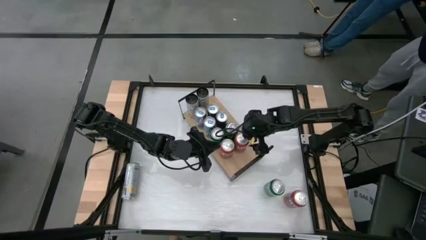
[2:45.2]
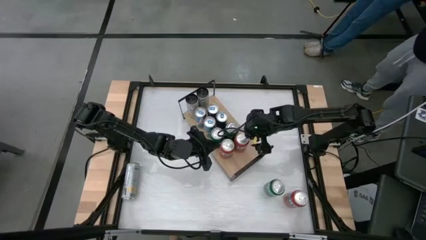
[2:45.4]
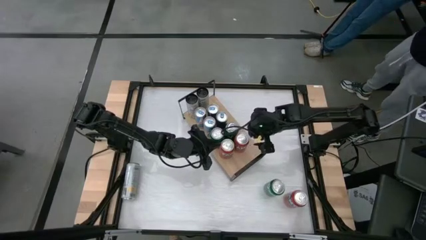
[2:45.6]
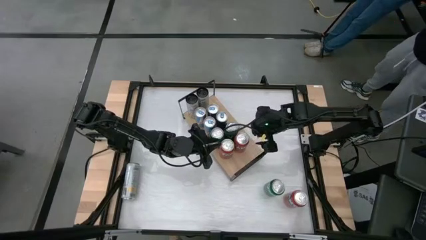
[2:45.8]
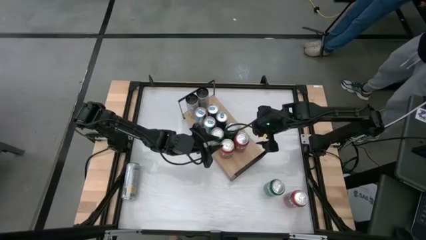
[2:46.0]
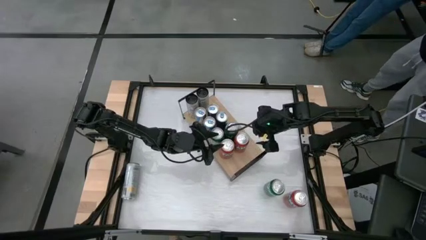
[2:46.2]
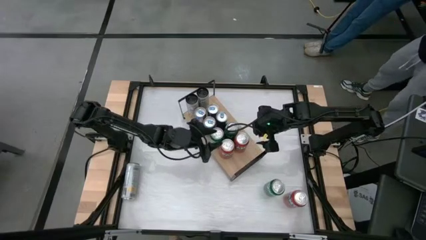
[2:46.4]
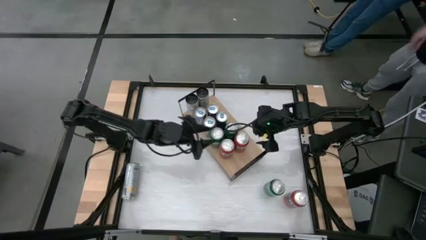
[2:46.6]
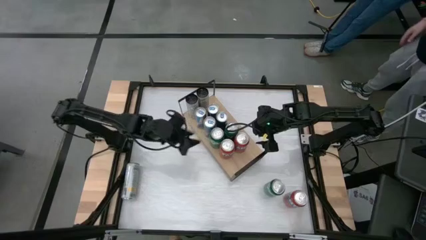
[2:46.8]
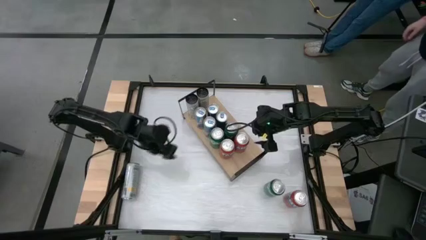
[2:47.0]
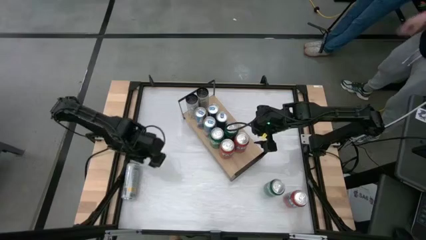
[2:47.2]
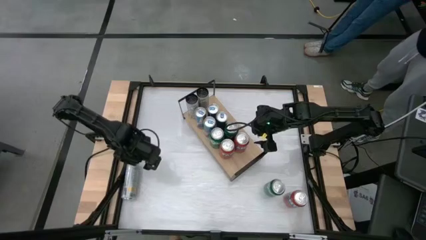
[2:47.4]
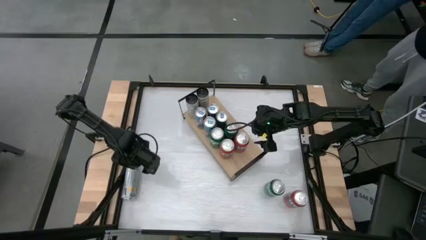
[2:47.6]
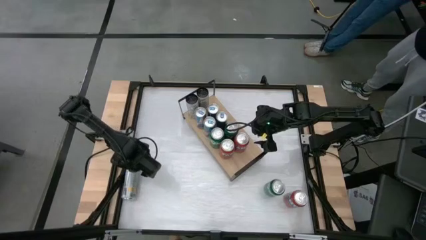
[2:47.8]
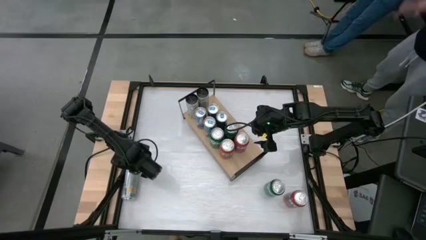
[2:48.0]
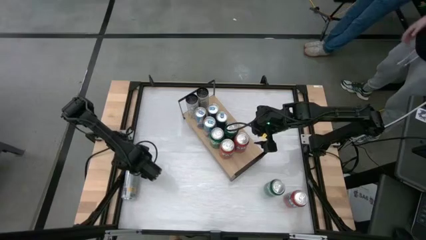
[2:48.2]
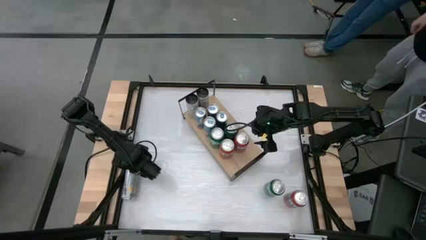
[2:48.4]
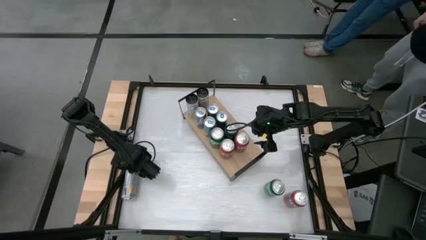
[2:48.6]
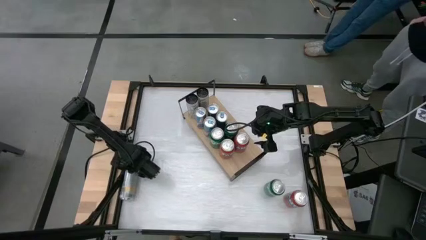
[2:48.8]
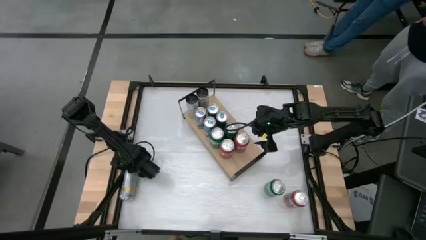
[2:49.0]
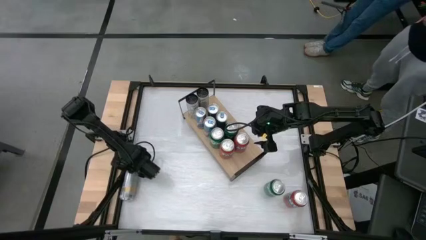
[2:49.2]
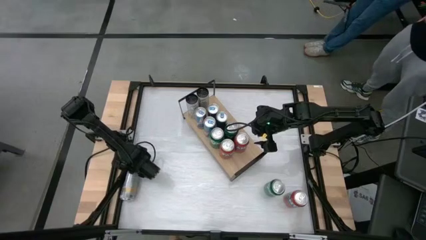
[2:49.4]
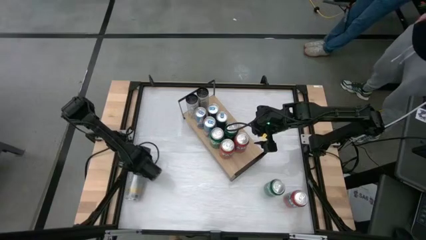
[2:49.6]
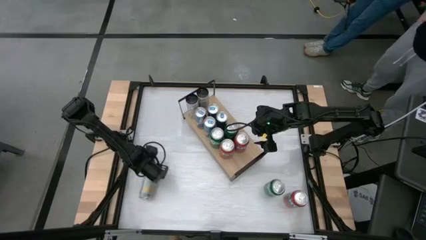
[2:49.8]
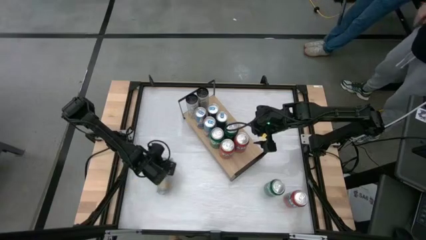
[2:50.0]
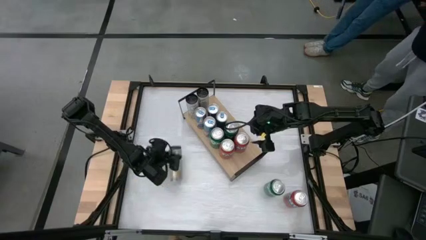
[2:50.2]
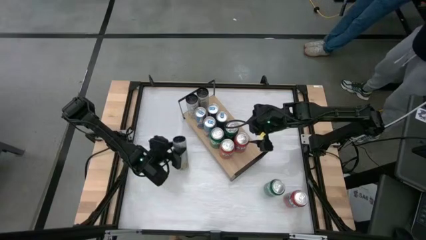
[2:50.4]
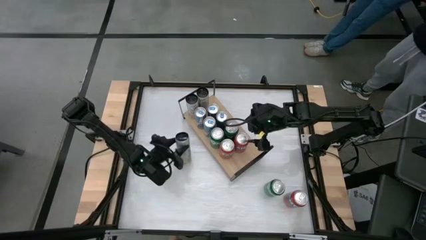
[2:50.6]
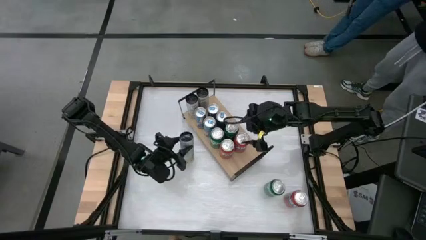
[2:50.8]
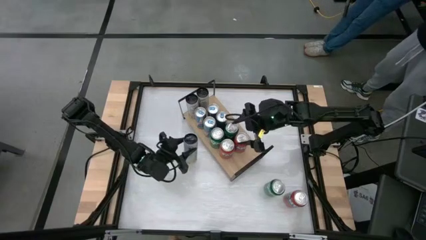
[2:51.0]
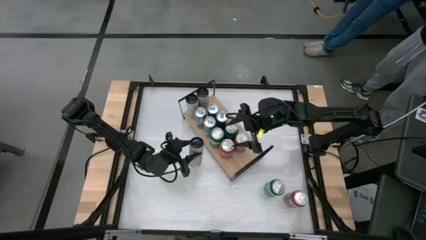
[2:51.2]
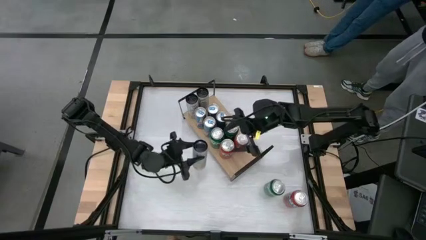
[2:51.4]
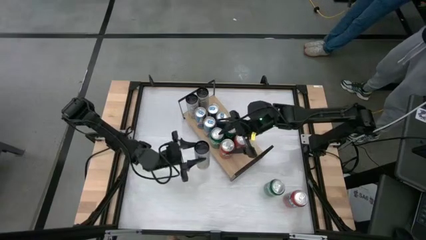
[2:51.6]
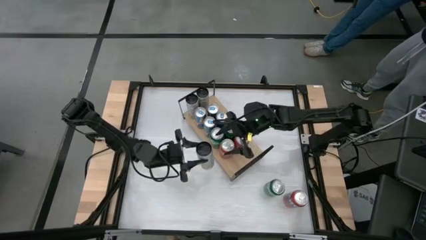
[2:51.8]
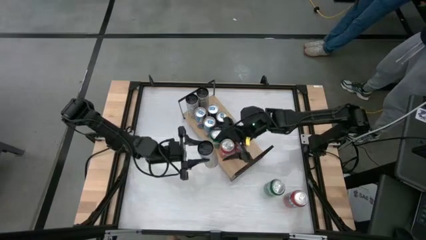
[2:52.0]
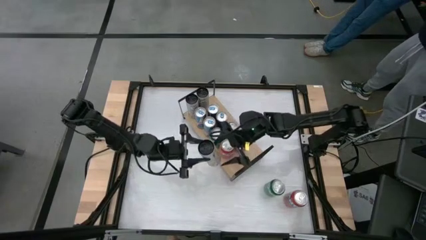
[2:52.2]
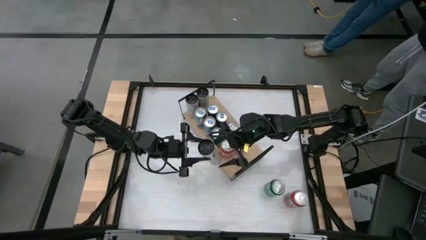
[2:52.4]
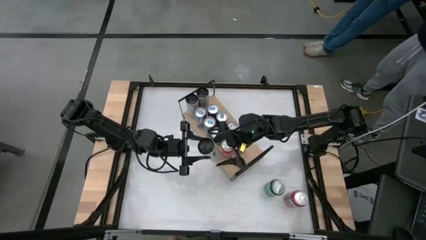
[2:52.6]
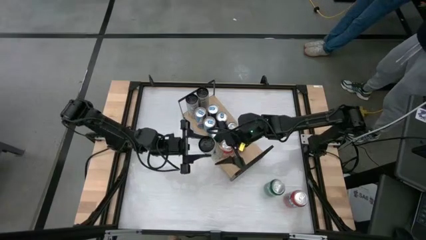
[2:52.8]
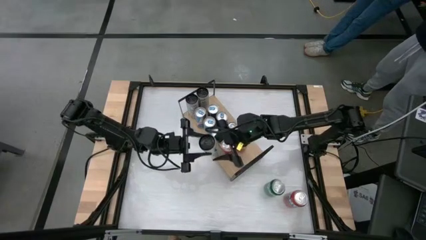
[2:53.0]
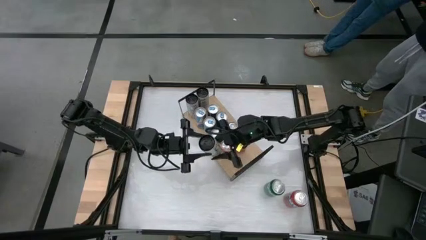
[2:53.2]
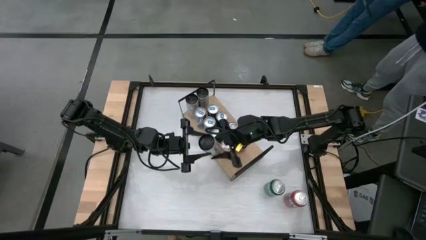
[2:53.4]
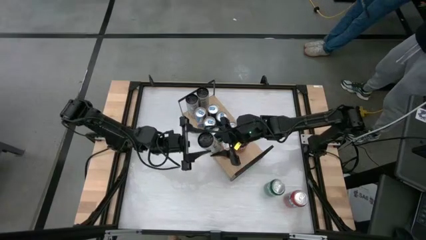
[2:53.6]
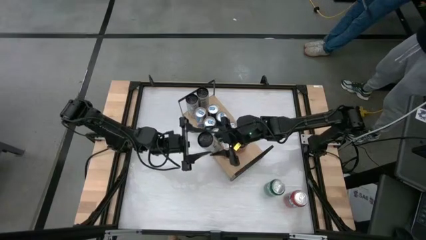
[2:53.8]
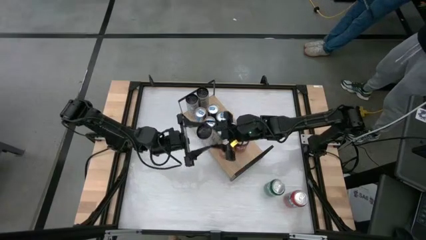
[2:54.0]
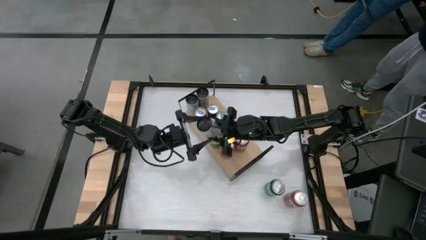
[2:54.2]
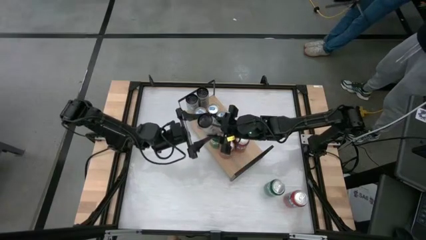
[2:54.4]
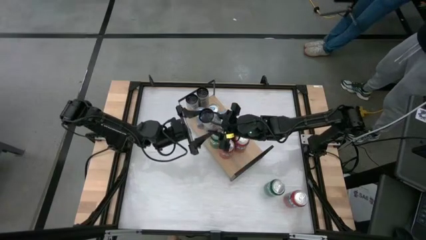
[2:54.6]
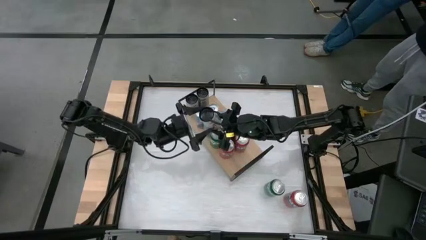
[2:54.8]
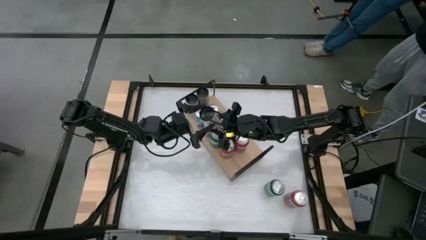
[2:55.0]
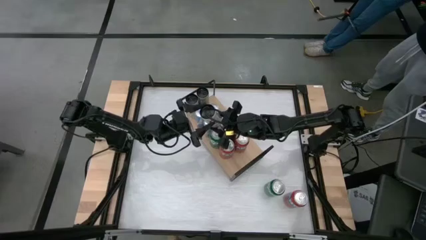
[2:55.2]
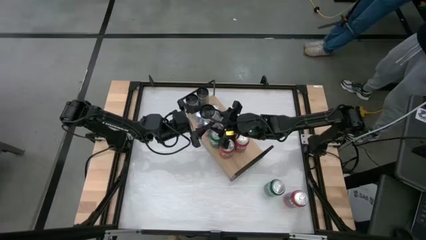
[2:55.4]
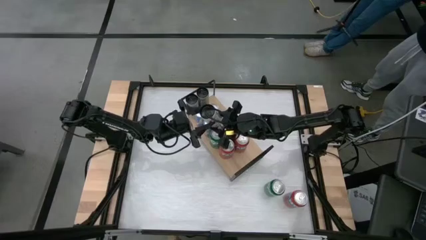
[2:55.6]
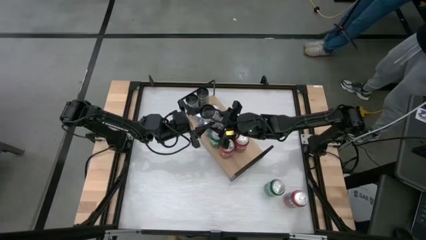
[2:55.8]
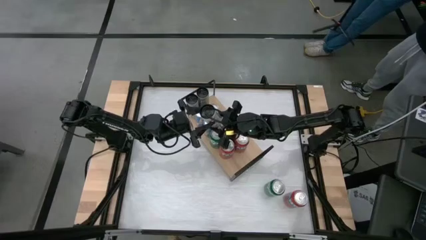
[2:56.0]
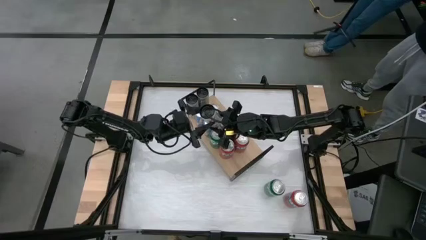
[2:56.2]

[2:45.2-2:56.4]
Task: Place canned beverage on shelf
Put the white yellow soda can on the shelf aligned with the other white yellow soda cans

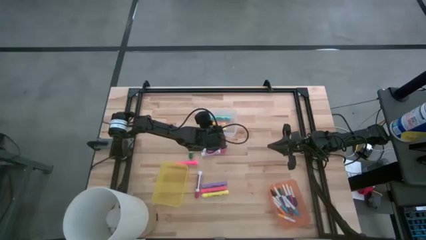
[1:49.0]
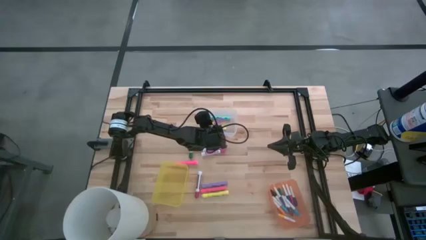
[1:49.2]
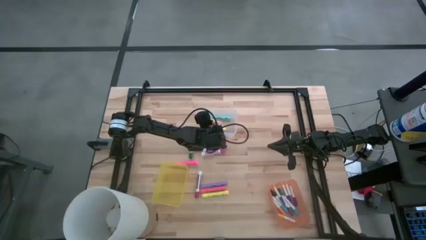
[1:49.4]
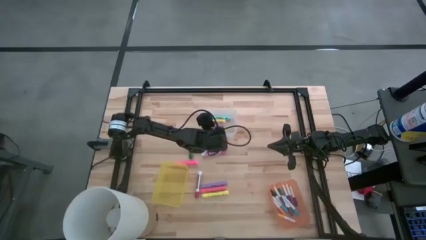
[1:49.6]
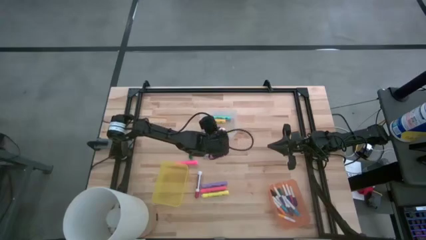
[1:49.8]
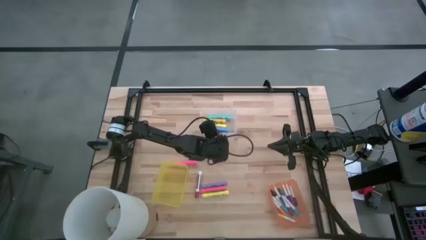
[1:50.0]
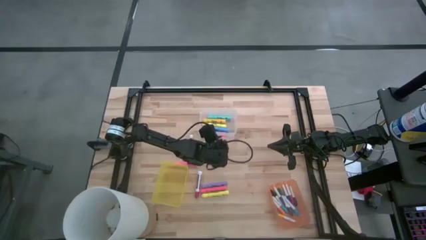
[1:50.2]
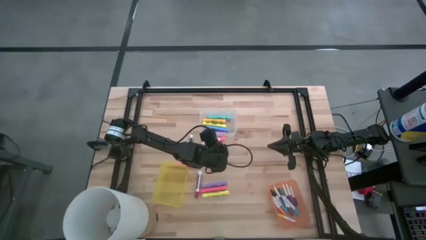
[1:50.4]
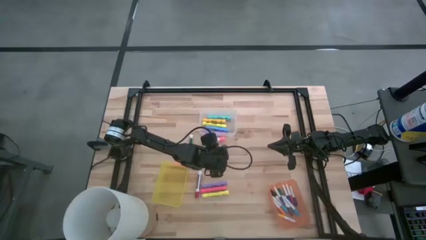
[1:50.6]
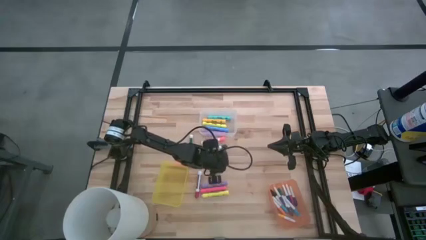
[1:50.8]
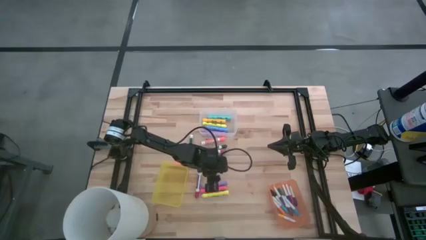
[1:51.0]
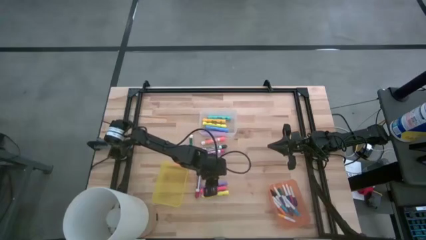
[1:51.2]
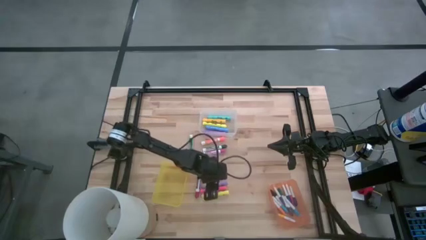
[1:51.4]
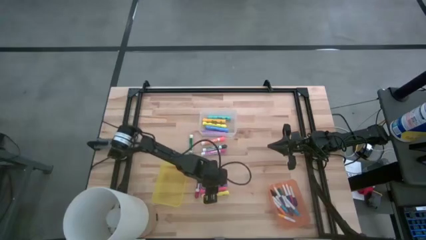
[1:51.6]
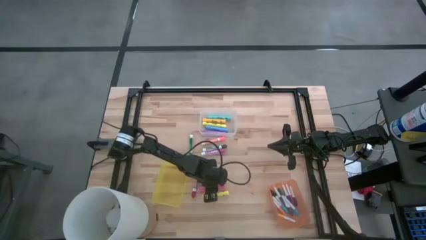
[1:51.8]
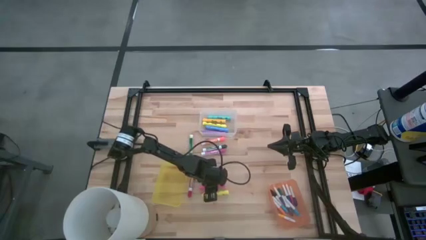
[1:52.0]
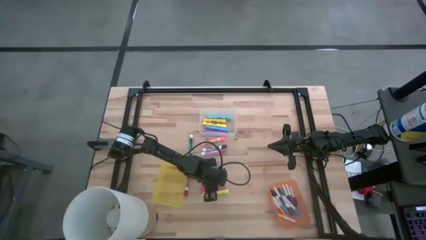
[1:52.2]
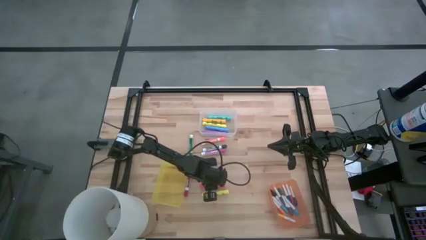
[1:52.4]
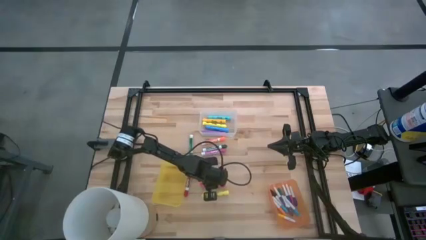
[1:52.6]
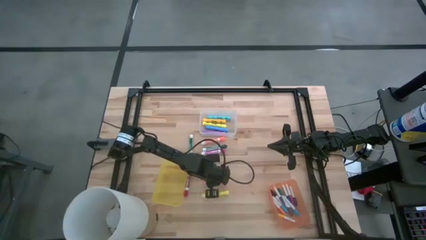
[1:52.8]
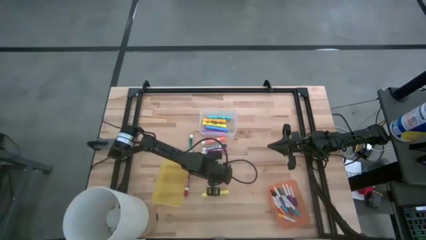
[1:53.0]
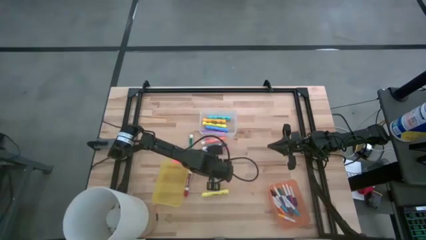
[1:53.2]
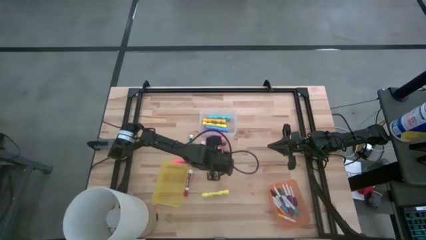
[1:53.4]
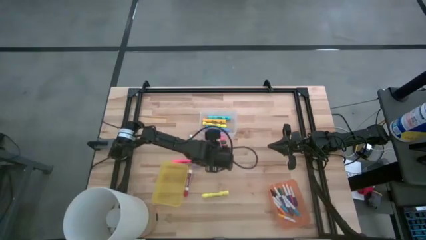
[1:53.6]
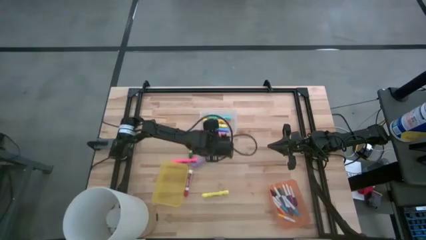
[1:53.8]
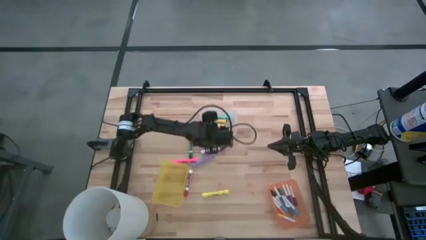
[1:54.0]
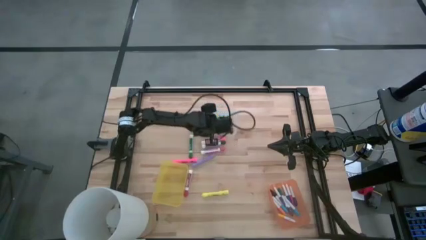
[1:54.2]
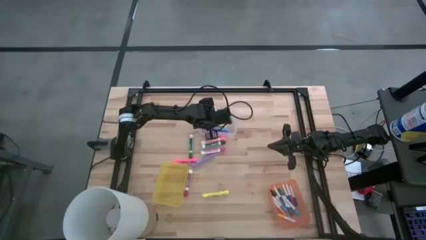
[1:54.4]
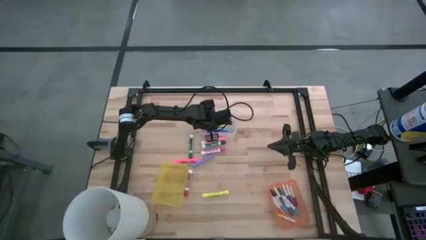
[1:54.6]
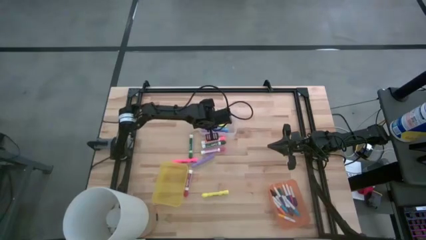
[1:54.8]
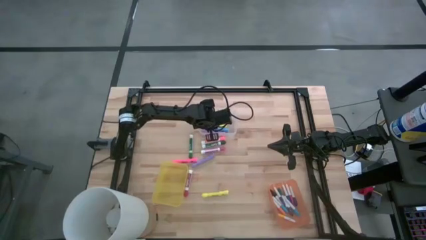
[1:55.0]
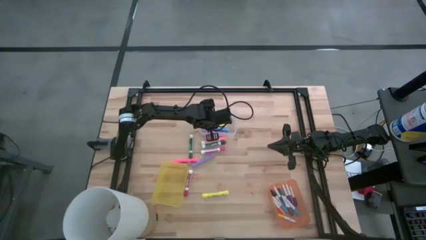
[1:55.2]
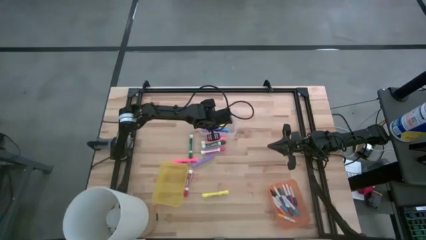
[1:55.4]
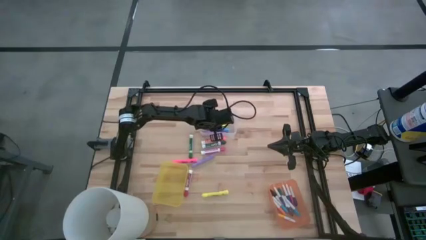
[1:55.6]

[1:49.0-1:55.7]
Task: Pick & Place Markers
Put the large red highlighter pen into the transparent bin
